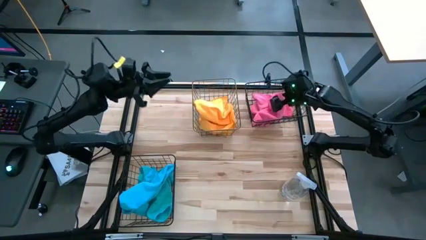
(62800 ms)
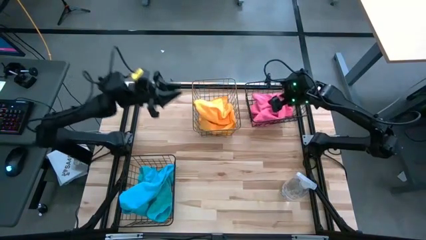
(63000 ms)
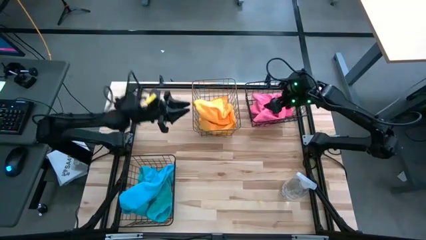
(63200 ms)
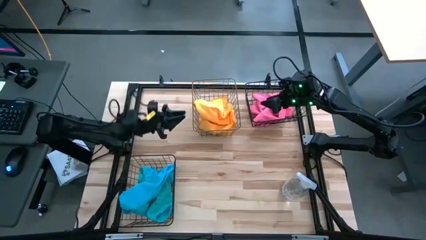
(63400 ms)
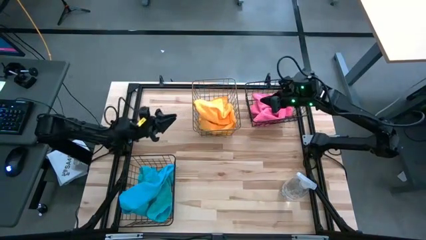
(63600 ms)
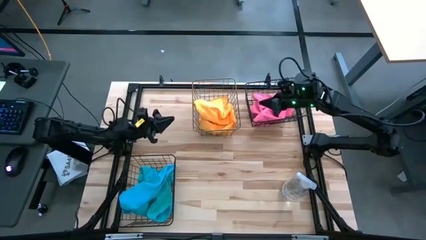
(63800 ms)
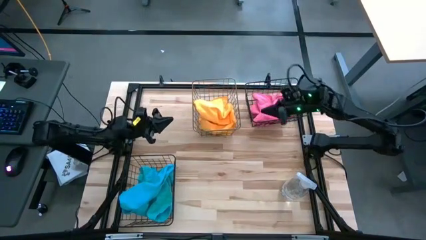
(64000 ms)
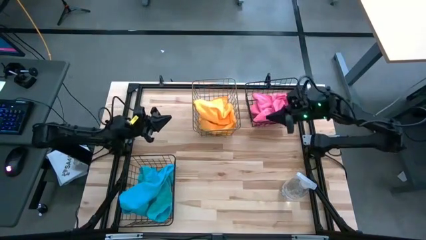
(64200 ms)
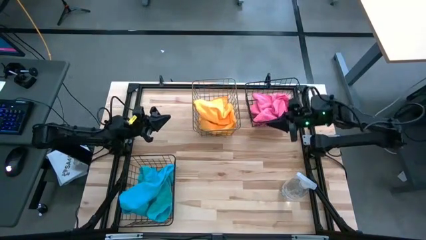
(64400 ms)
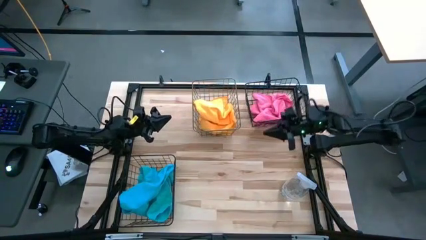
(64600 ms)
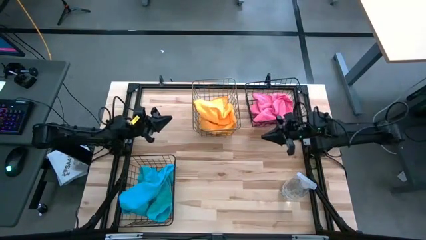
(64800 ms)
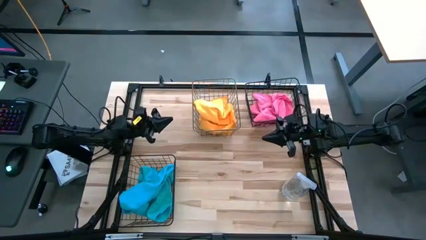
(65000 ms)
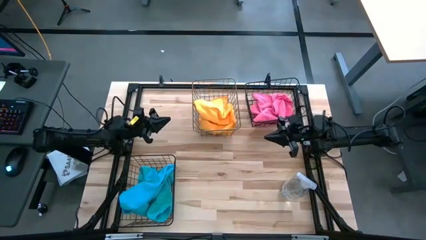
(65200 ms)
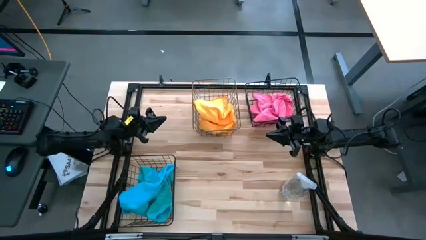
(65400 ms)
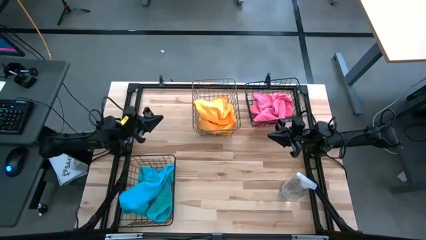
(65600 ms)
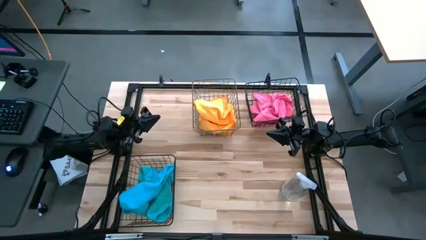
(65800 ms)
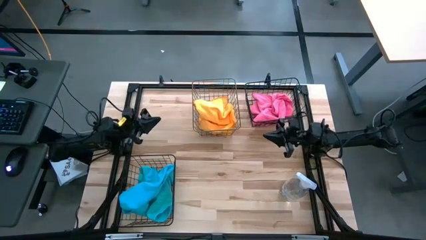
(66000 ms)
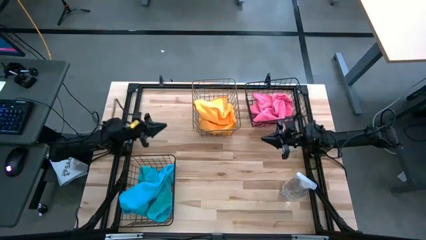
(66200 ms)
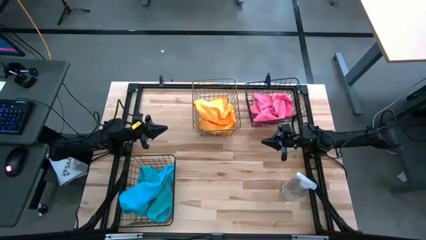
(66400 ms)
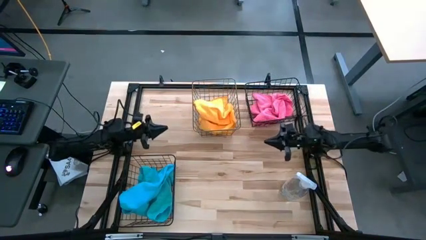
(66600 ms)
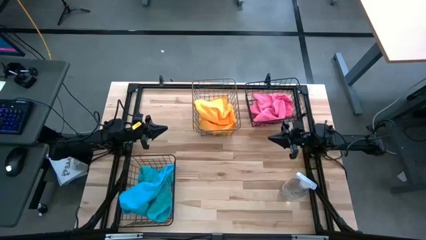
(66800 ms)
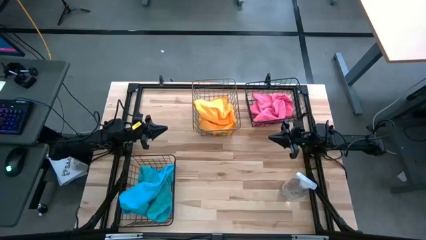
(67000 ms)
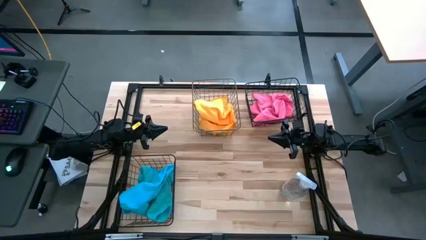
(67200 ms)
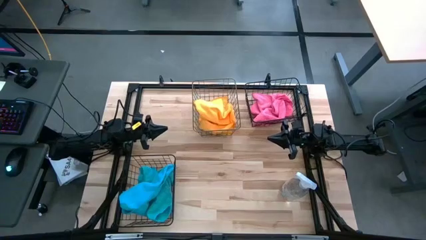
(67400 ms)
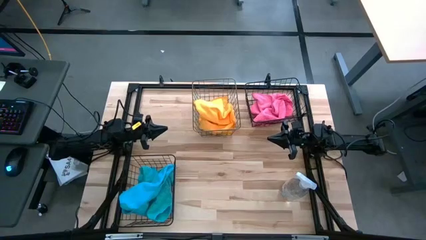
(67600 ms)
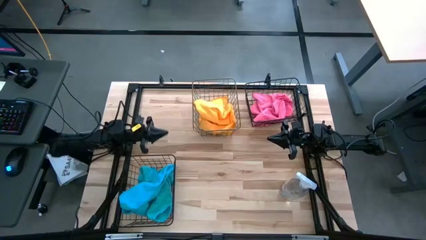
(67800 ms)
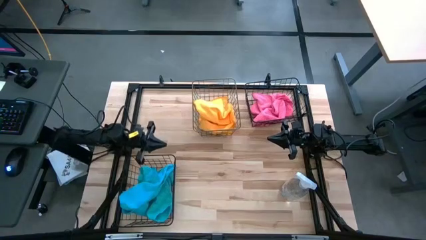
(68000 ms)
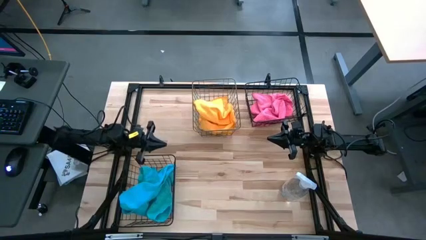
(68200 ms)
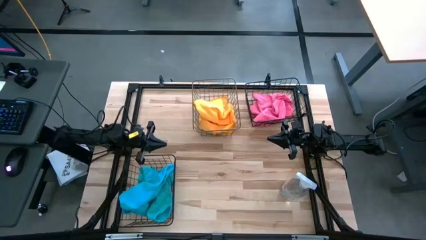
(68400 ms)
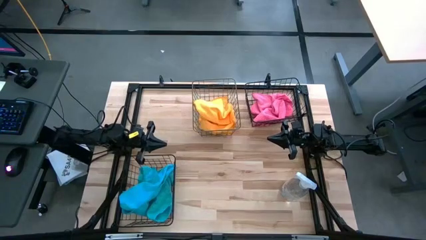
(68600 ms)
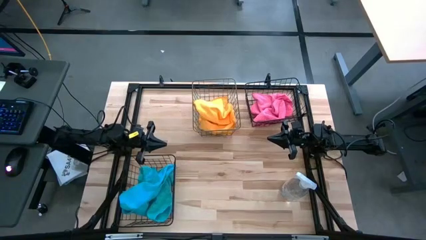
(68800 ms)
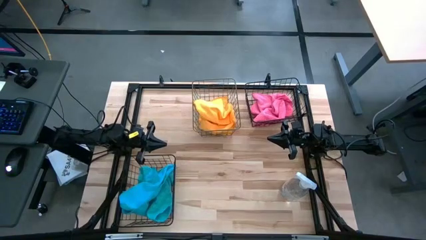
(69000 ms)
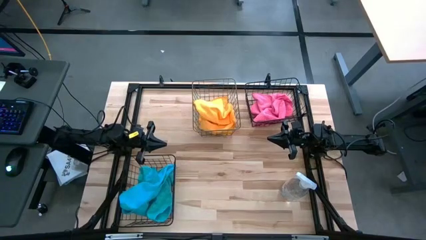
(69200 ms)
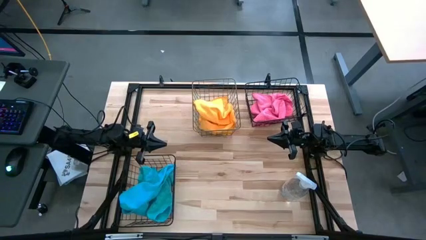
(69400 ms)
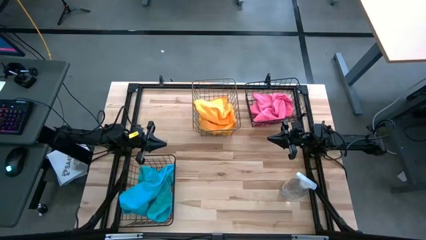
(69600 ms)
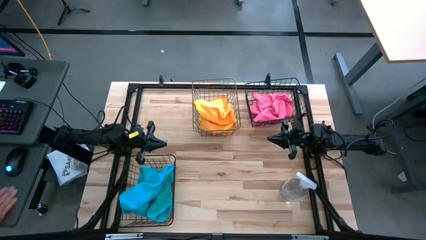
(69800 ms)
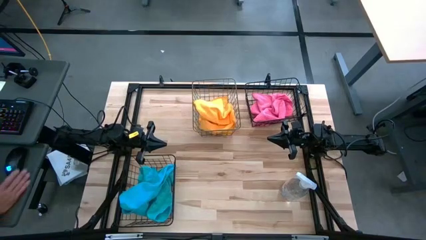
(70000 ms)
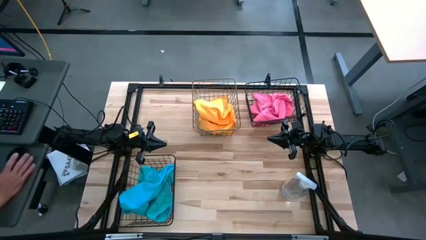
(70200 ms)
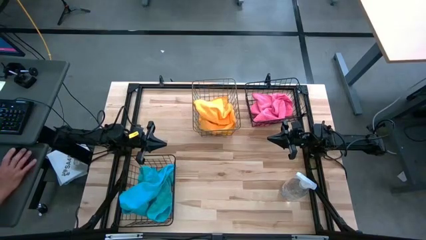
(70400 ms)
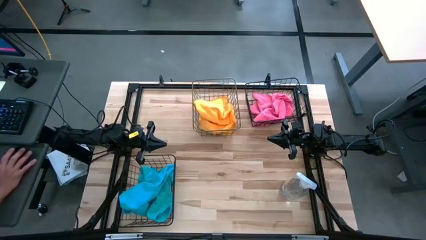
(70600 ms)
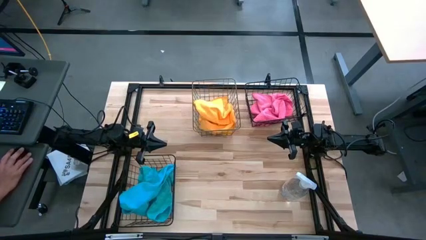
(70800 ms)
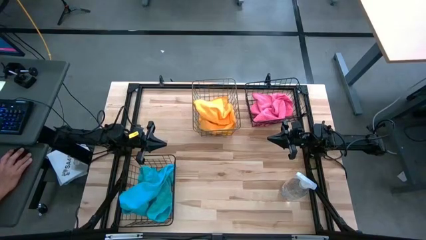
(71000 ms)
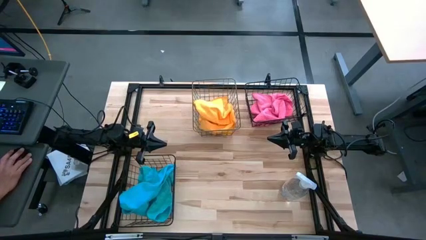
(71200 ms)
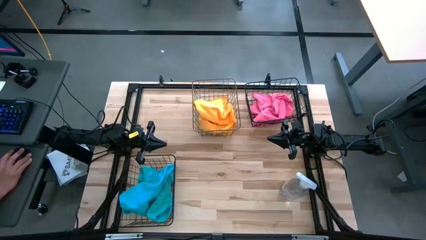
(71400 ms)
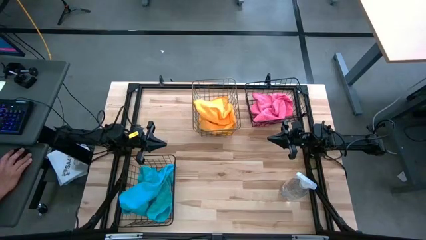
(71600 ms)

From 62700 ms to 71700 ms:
Task: Sort microfiber towel by color & place in baskets
Return to Home Position

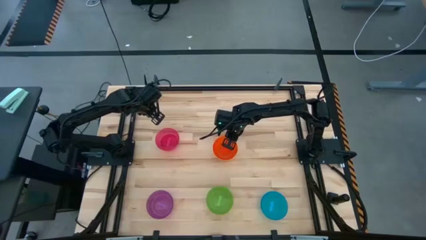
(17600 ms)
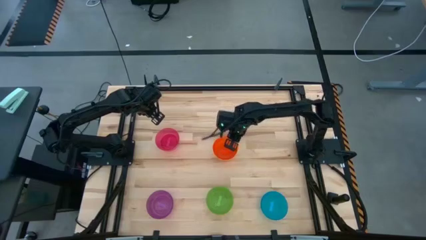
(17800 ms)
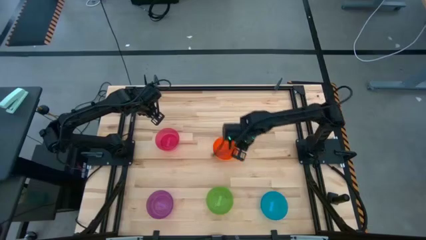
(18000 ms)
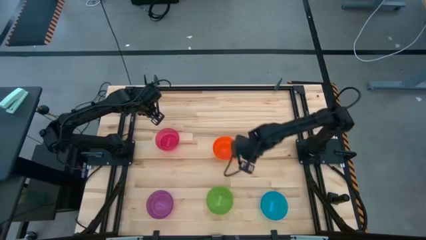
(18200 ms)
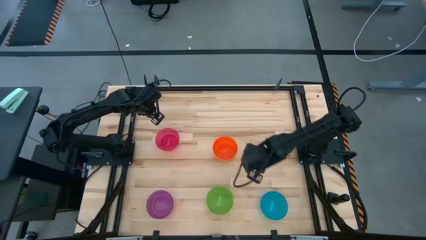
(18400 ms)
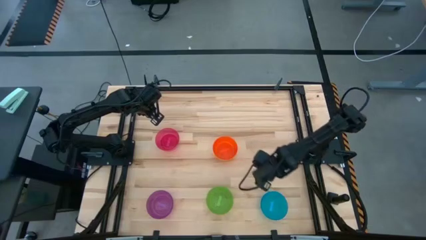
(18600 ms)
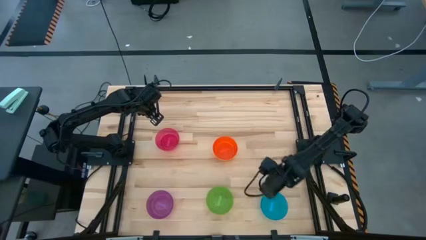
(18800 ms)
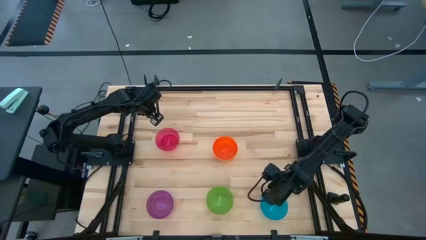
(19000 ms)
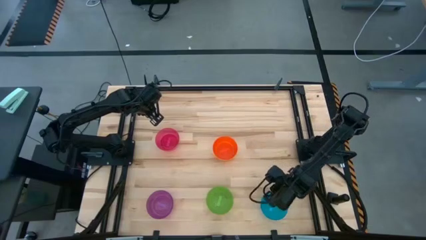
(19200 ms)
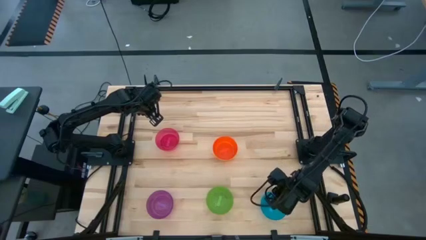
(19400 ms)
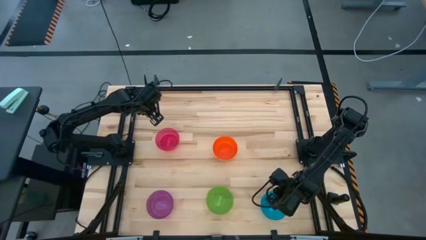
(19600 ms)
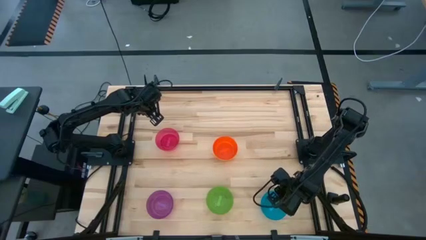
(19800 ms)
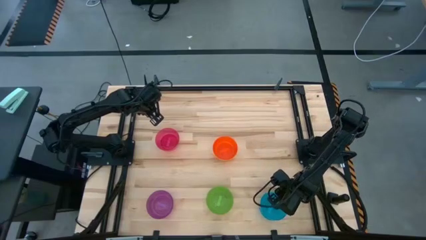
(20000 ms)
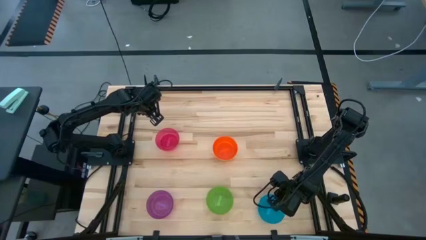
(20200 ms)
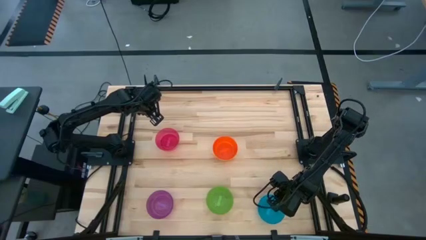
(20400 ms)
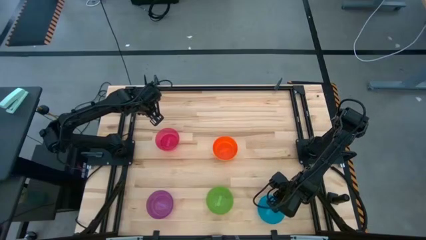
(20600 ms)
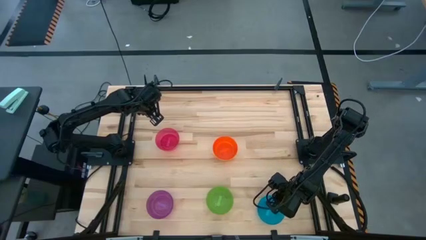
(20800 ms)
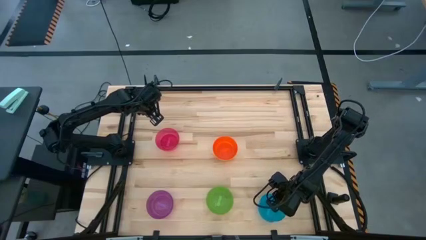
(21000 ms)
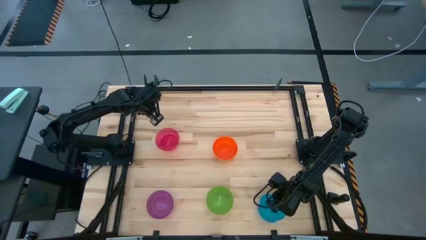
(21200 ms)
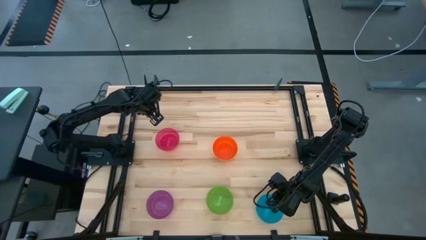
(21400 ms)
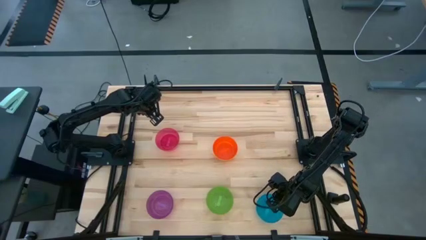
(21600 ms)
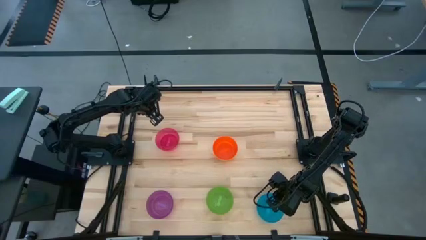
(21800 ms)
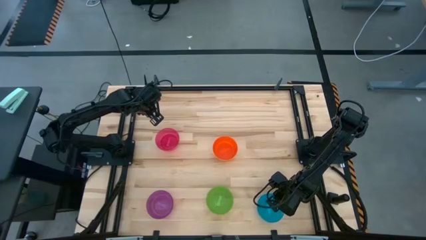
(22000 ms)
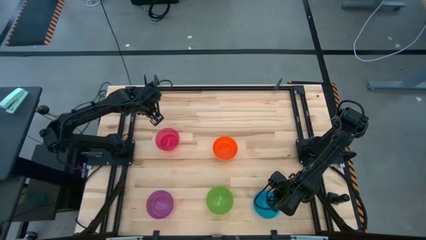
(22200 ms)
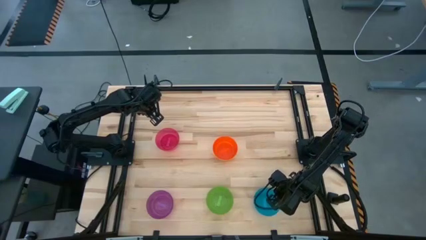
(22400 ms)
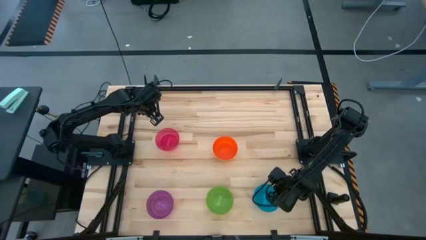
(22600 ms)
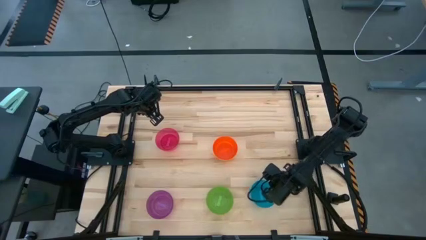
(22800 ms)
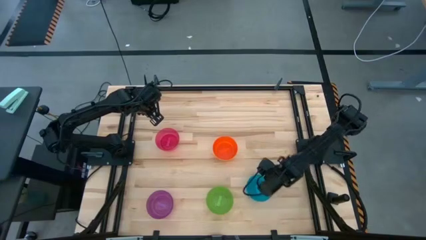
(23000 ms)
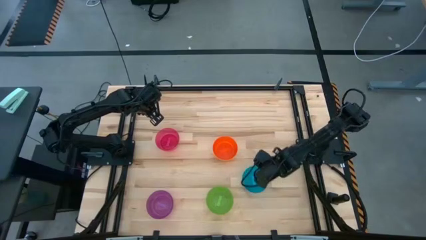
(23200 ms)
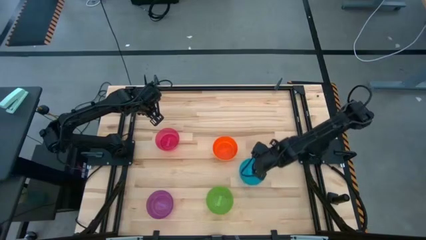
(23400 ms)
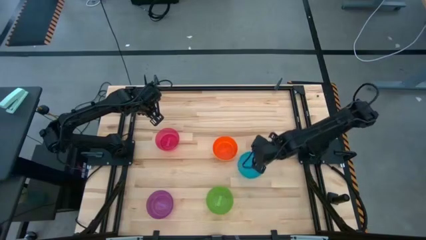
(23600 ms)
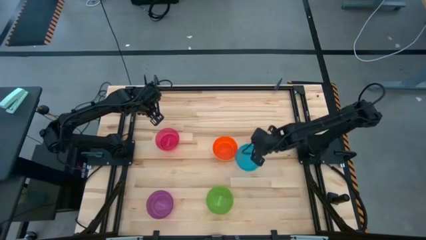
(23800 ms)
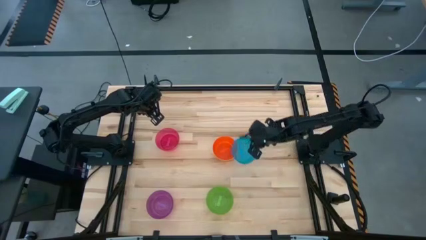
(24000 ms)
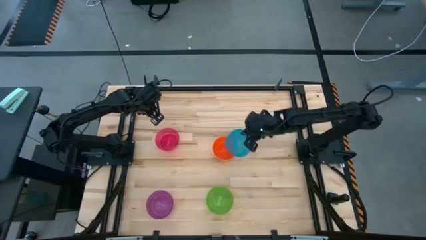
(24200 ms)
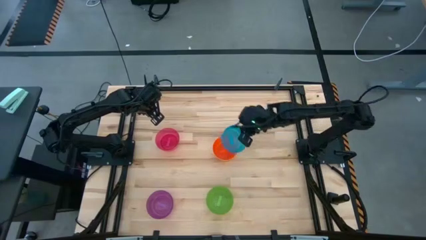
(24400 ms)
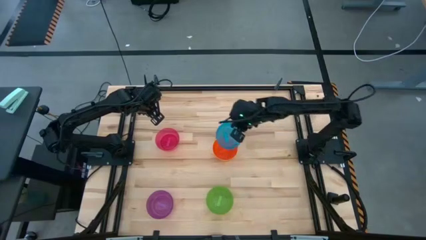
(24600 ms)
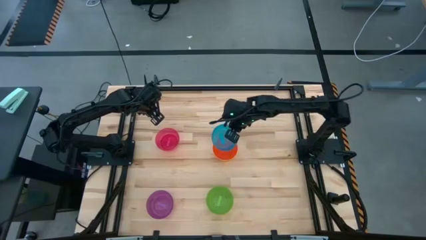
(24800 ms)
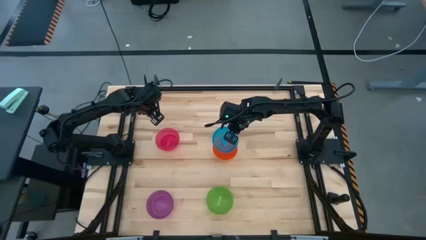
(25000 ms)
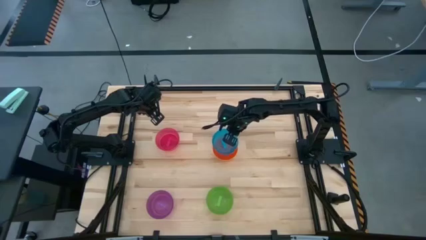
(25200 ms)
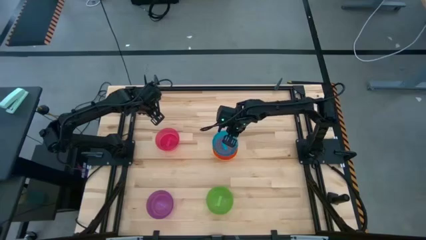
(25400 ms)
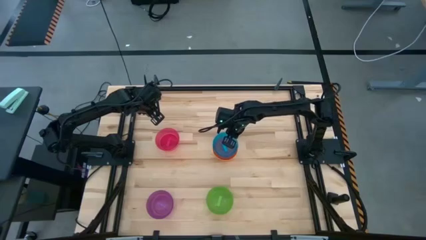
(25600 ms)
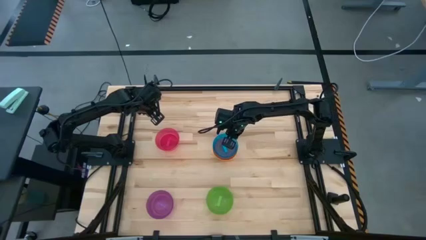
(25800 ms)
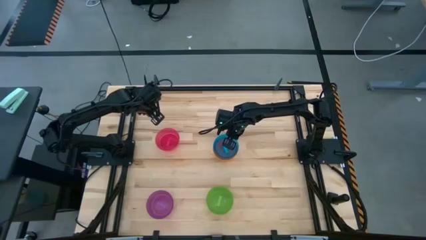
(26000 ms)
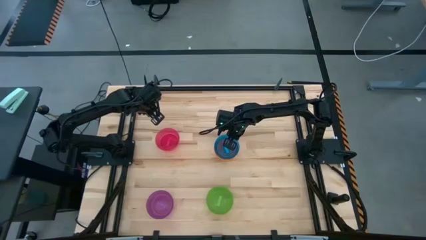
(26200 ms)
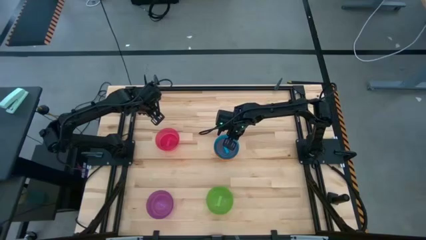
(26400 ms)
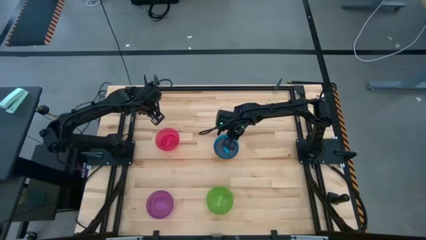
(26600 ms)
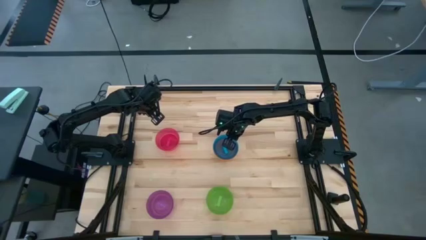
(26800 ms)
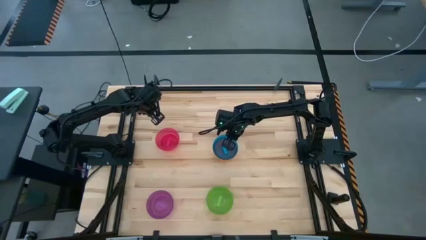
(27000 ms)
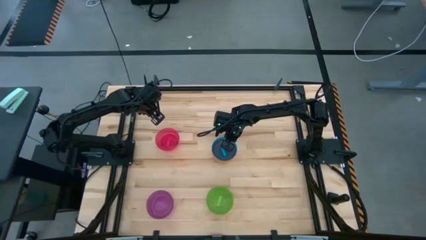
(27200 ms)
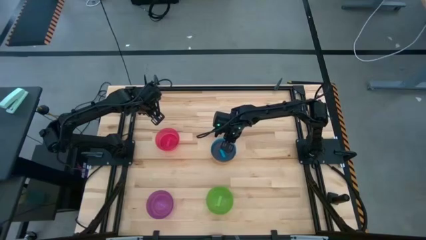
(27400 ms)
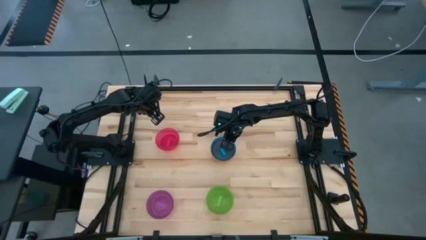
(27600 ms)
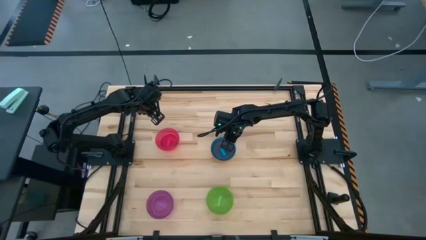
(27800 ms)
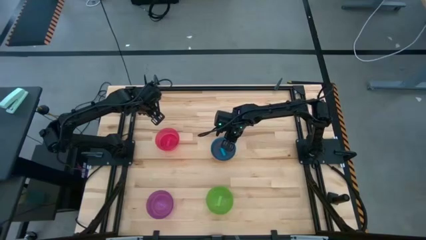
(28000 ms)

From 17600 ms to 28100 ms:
Task: Nest bowls inside each other
Stack the blue bowl on top of the orange bowl
